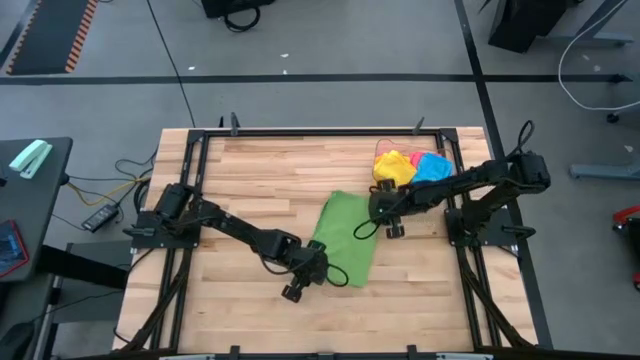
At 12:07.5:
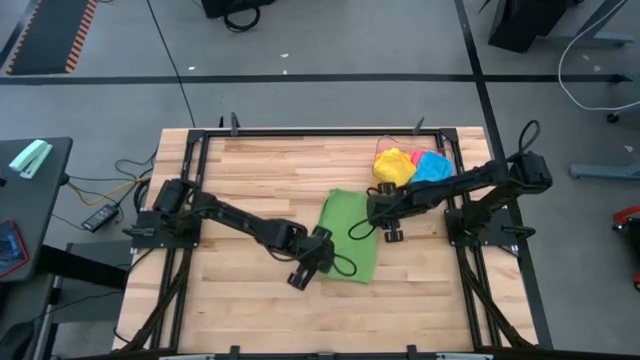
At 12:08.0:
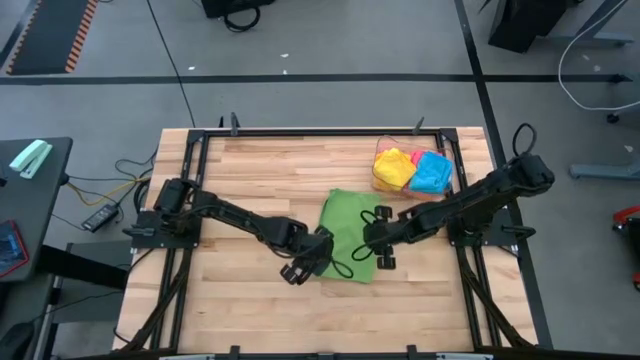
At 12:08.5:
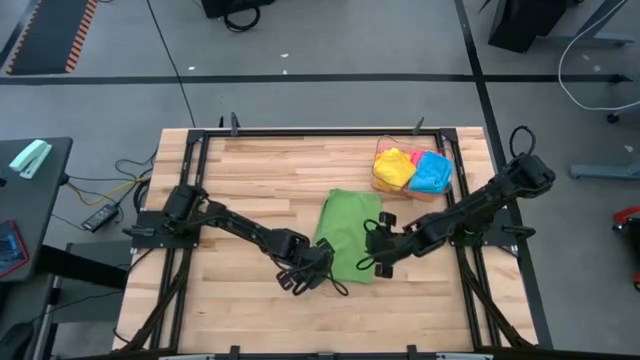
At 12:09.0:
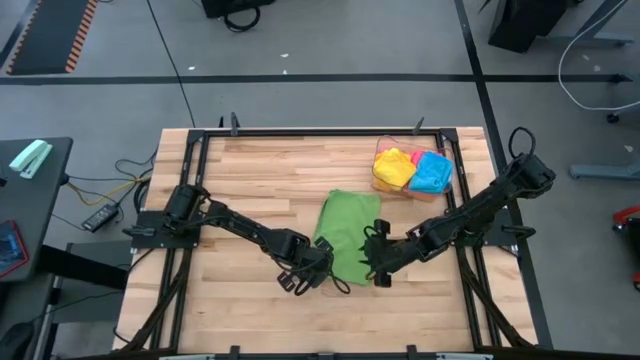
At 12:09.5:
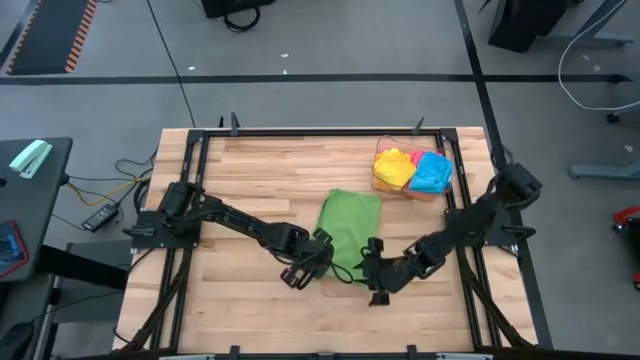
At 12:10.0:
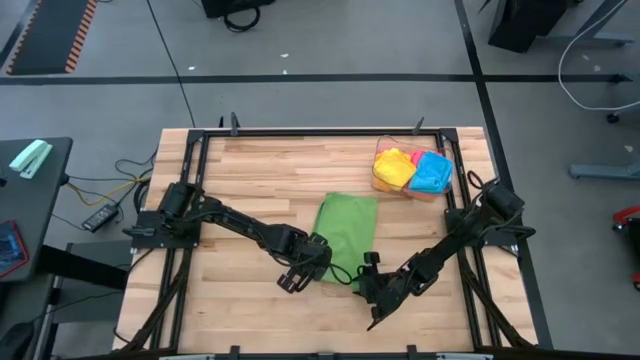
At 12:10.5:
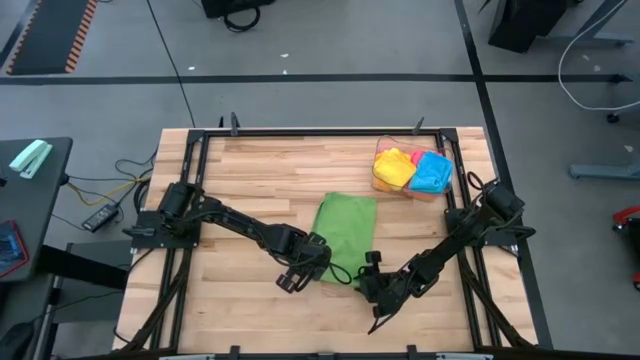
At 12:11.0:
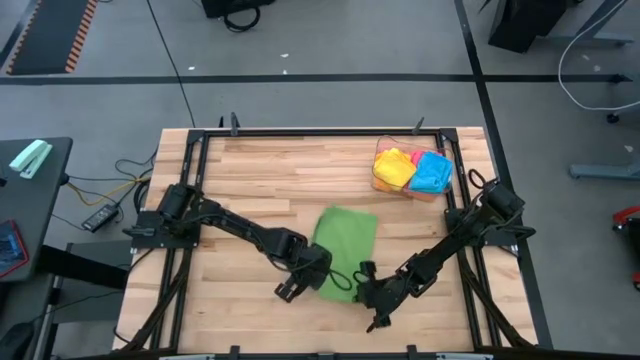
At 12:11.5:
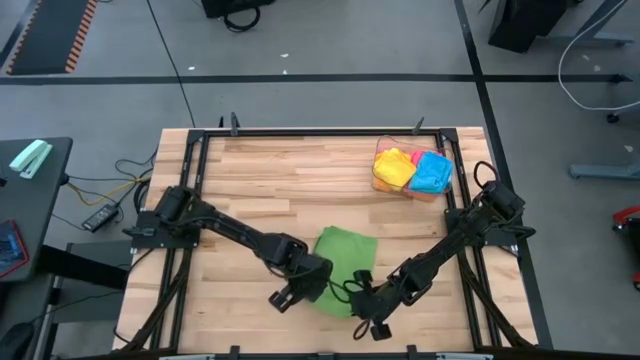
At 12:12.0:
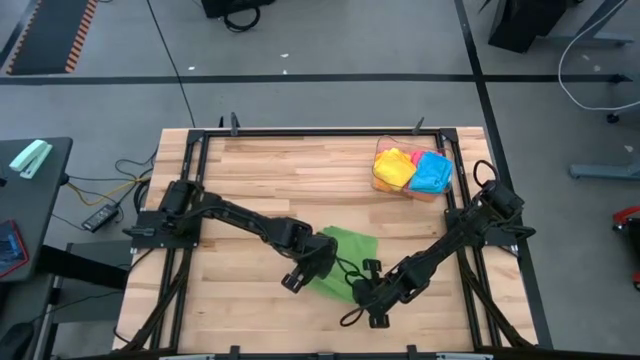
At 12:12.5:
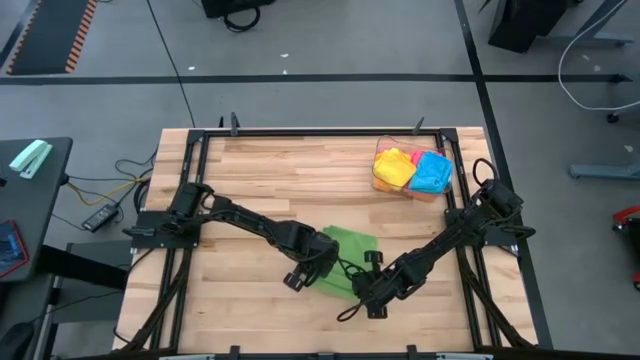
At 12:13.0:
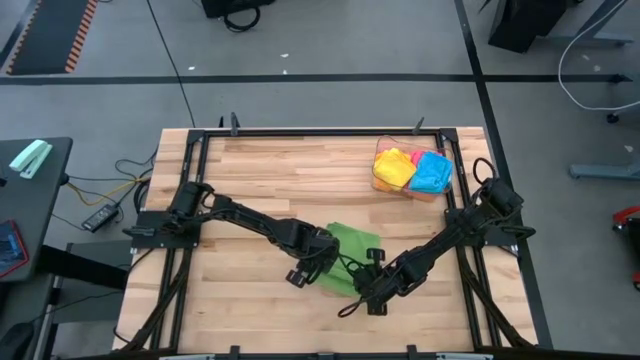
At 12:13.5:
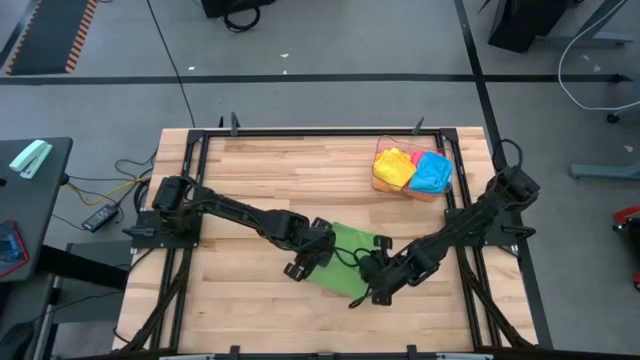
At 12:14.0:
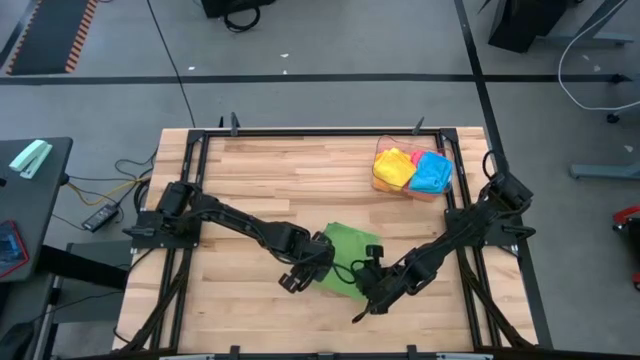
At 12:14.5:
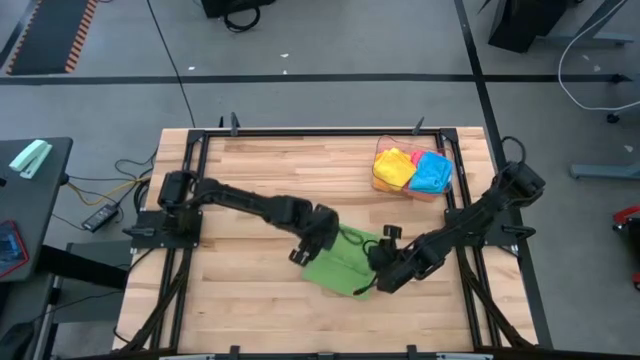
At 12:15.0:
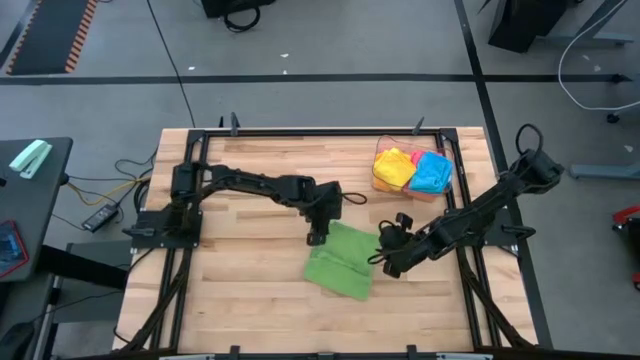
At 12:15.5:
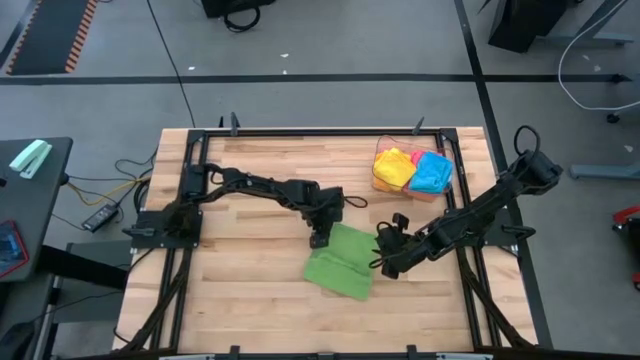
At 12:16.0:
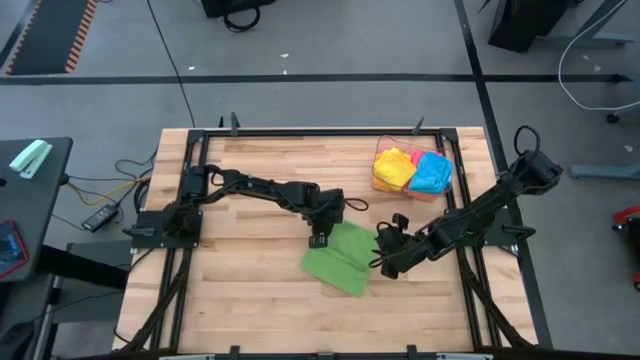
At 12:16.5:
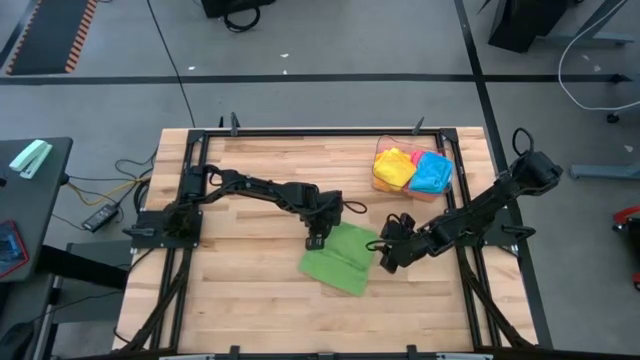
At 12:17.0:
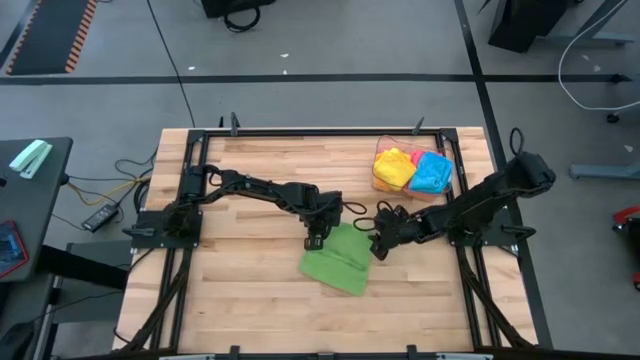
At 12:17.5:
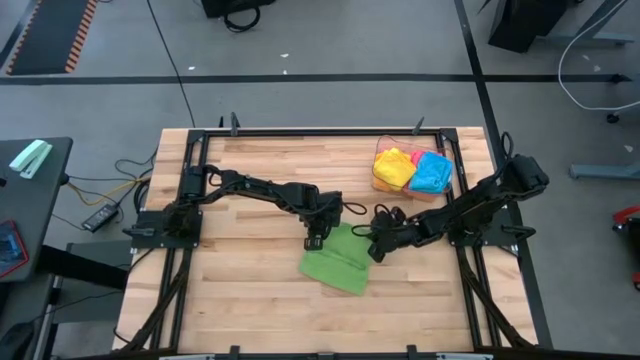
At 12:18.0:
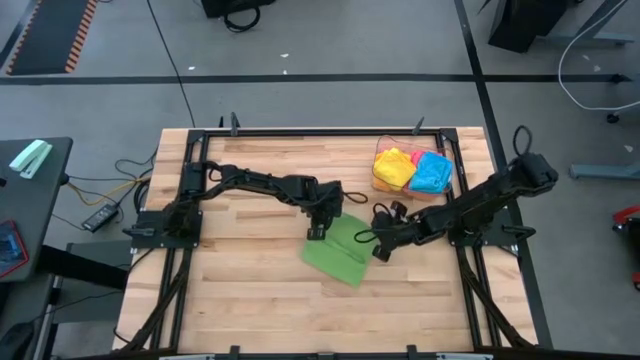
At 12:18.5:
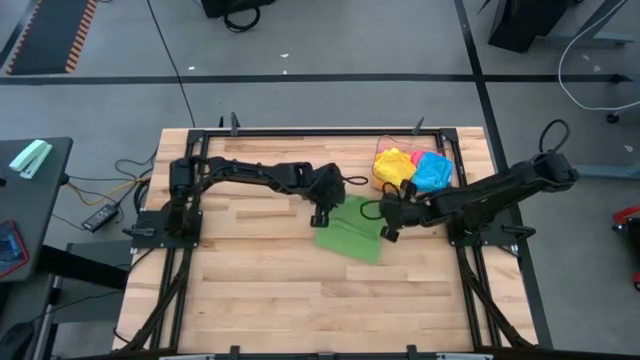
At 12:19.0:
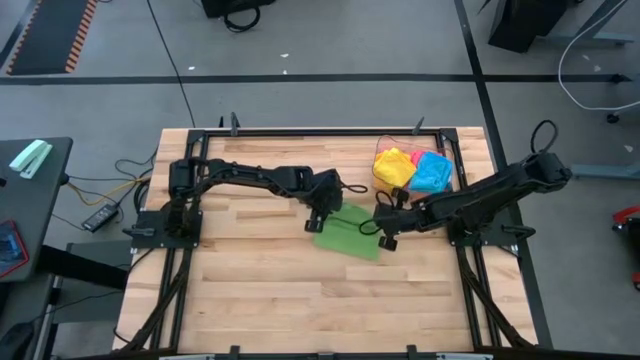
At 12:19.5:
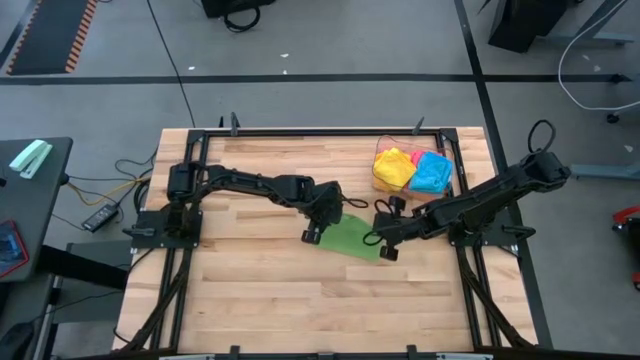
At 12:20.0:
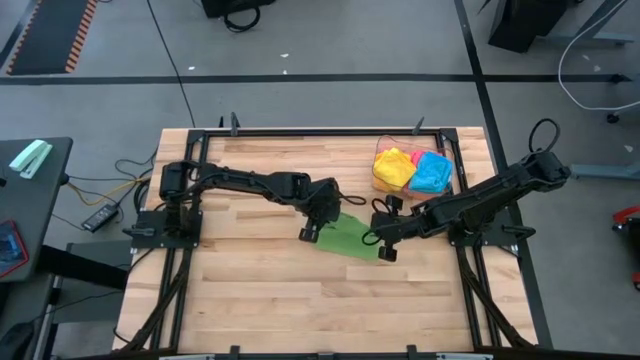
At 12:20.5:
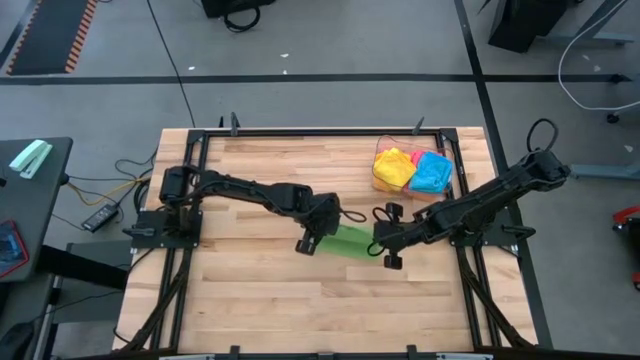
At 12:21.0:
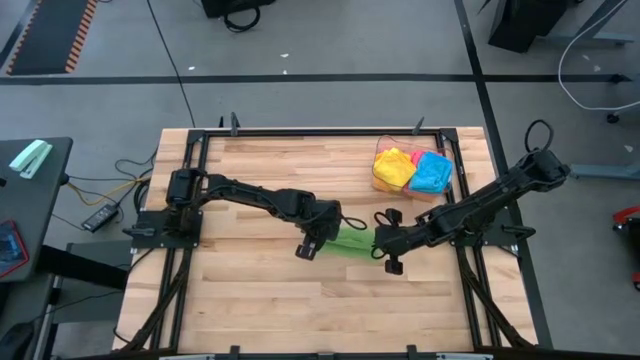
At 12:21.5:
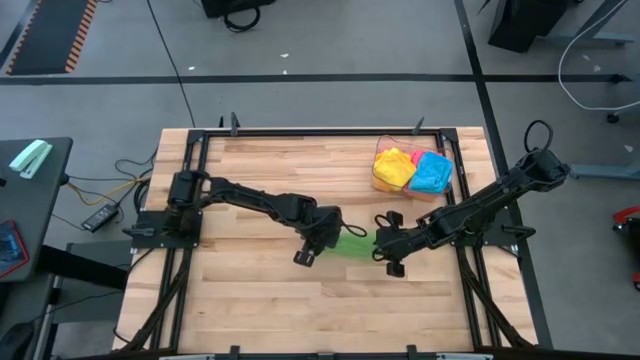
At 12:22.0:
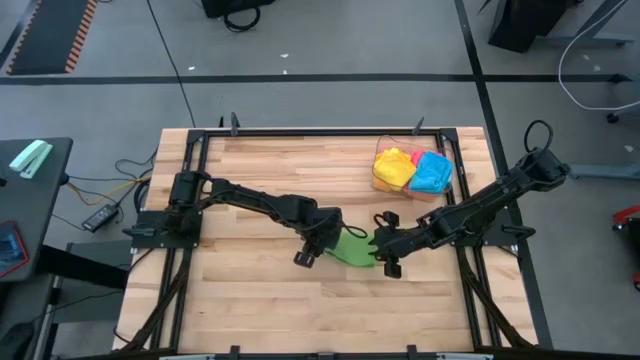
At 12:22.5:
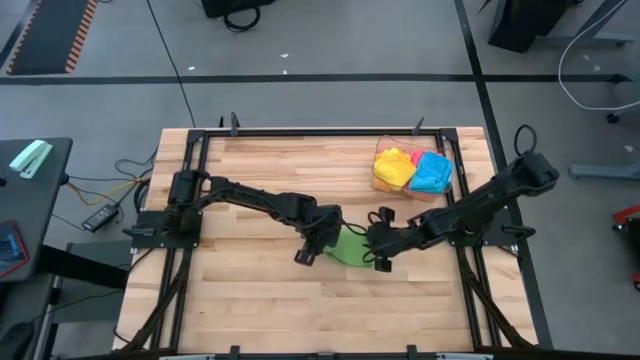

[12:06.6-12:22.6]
Task: Fold microfiber towels
Fold the green microfiber cloth

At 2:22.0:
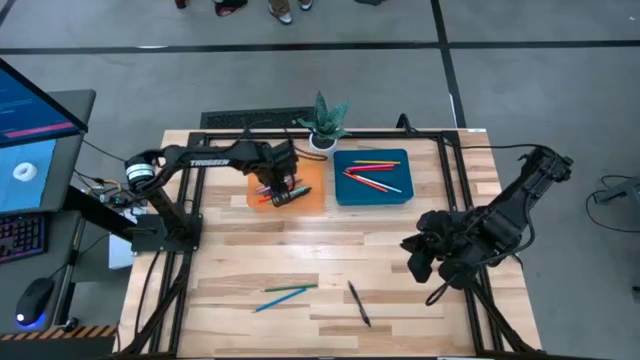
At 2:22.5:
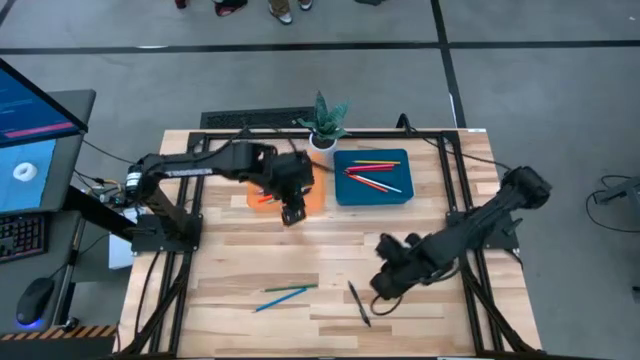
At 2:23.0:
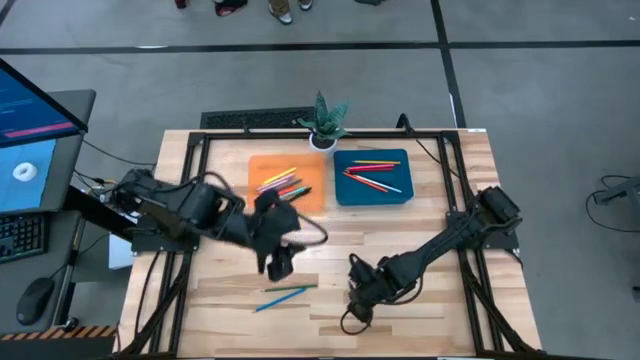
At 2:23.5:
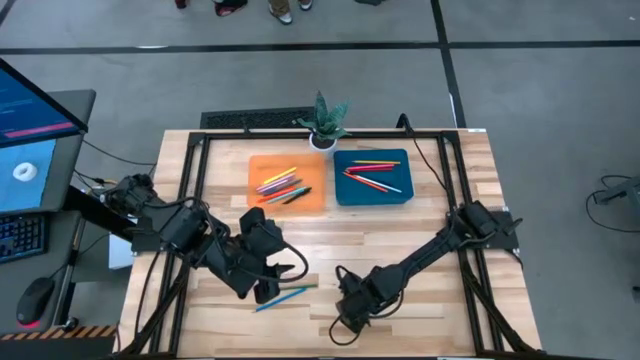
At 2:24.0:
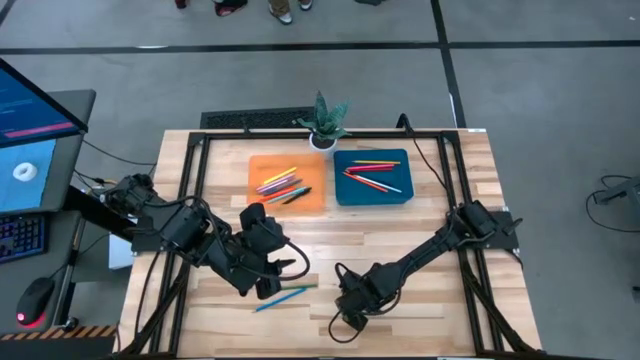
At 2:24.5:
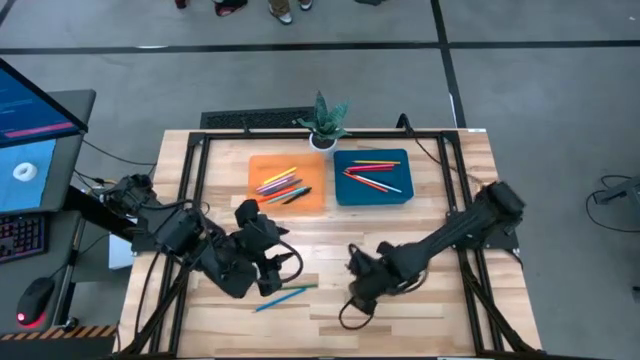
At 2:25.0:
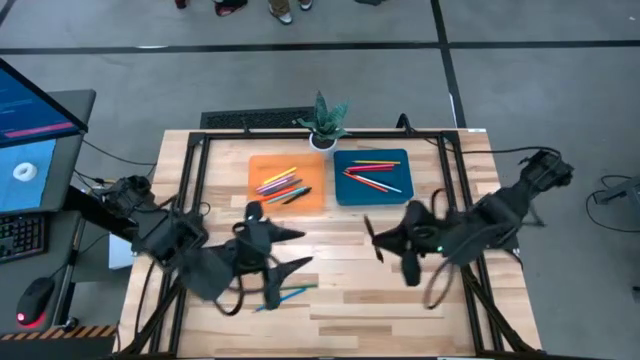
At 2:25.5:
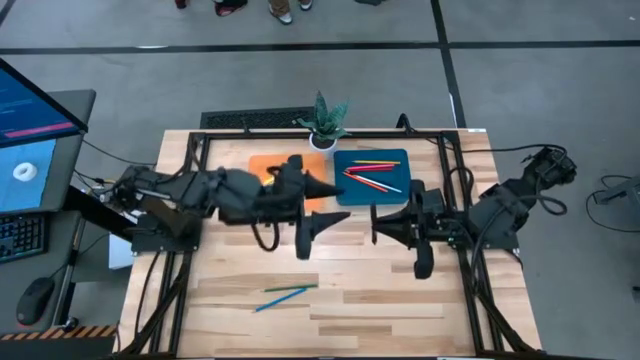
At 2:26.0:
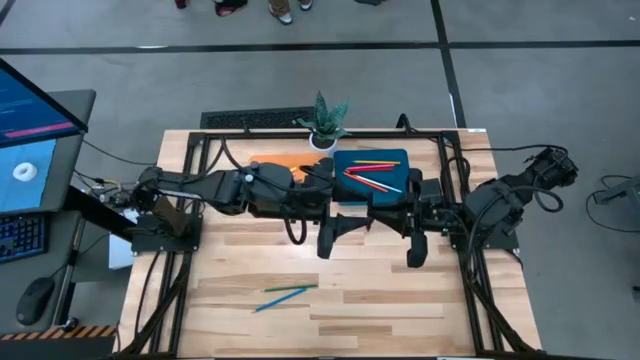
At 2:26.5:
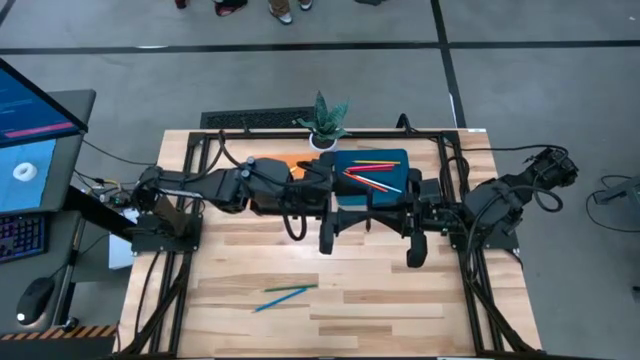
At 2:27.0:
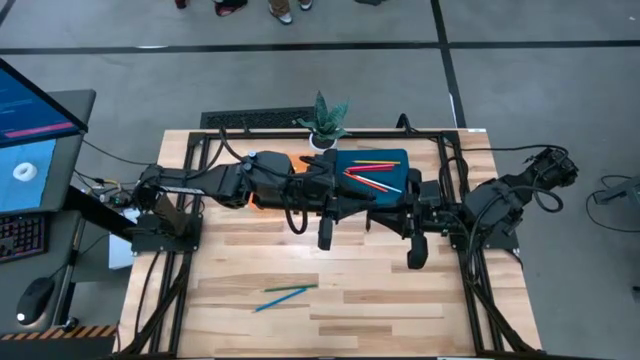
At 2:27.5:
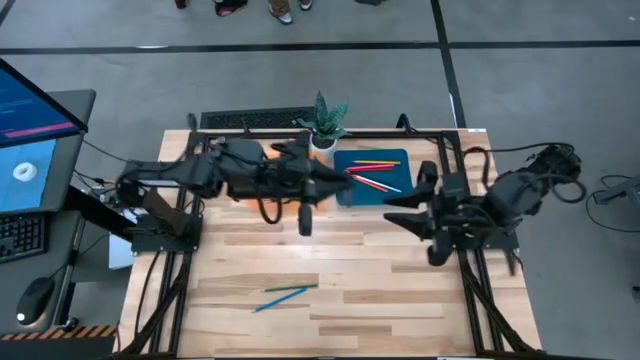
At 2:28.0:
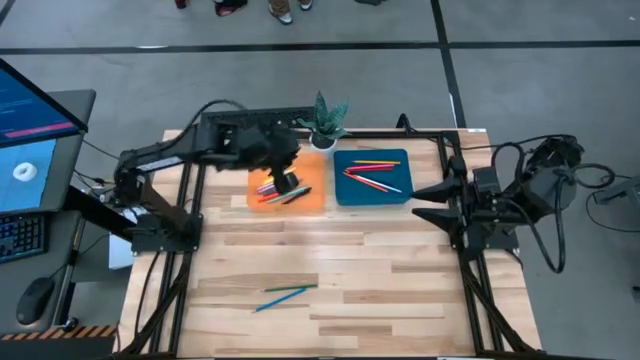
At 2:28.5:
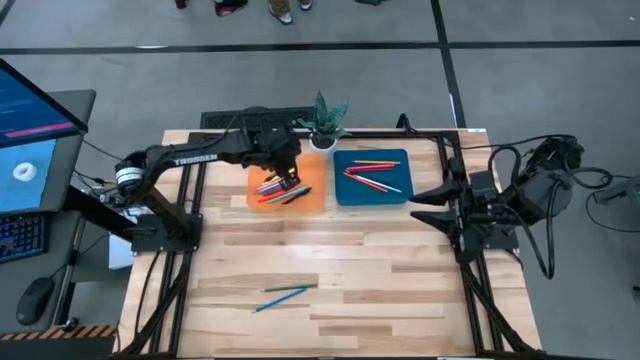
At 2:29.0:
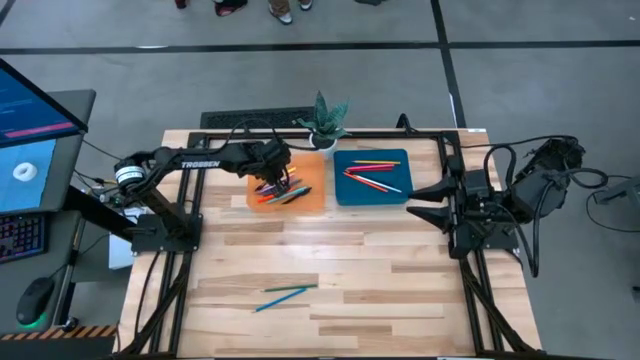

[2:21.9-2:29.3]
Task: Sort pens & pencils
Put the black pen into the orange bin
